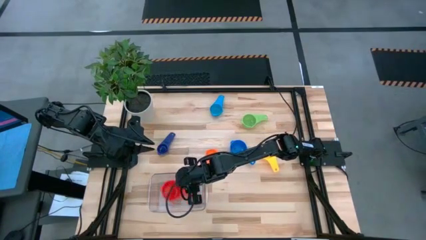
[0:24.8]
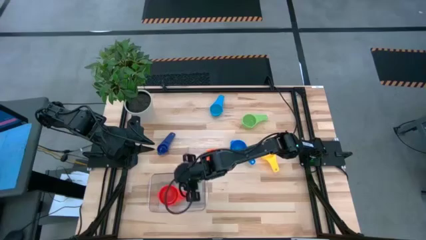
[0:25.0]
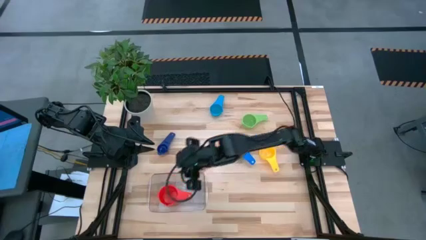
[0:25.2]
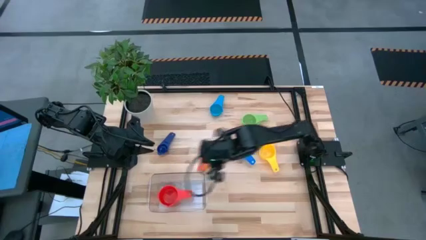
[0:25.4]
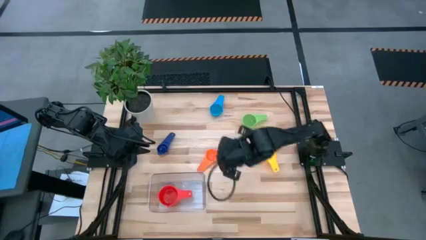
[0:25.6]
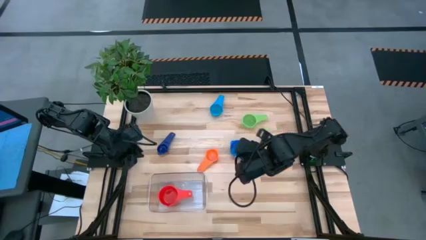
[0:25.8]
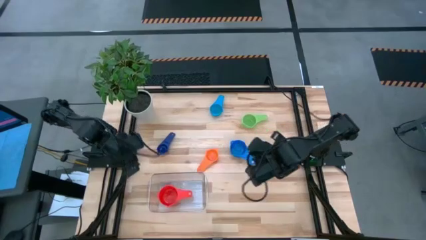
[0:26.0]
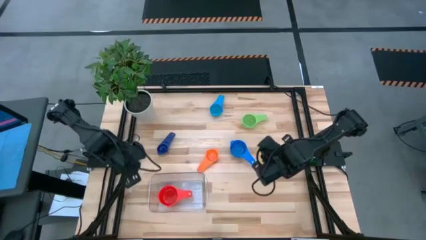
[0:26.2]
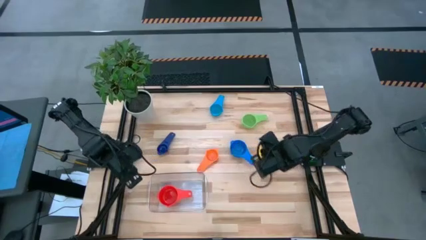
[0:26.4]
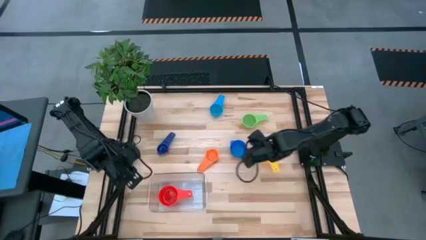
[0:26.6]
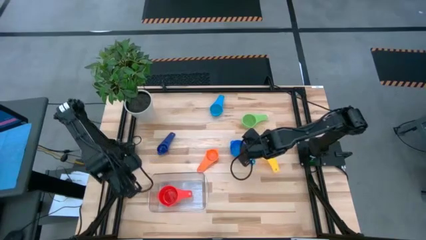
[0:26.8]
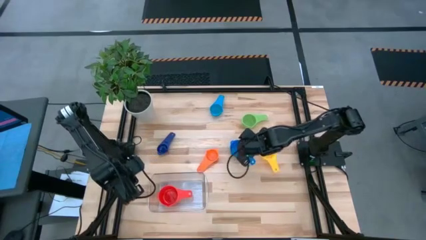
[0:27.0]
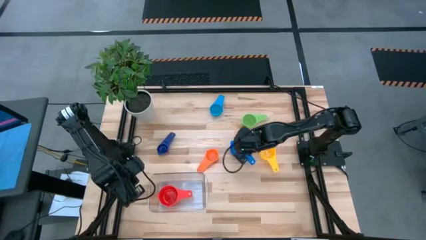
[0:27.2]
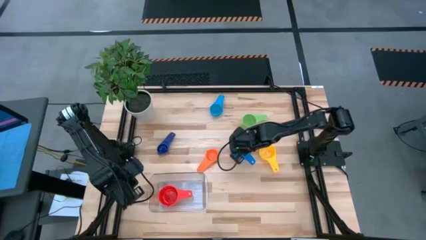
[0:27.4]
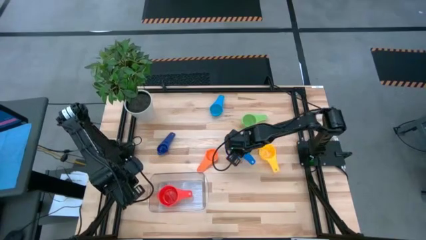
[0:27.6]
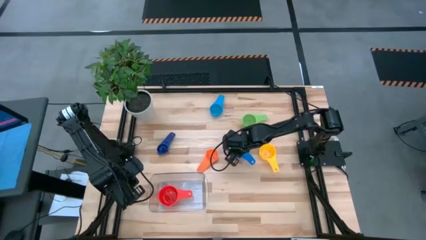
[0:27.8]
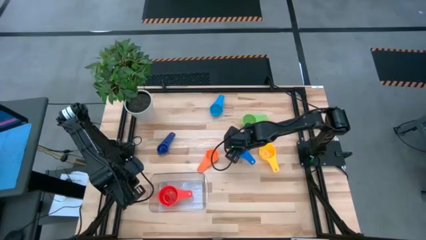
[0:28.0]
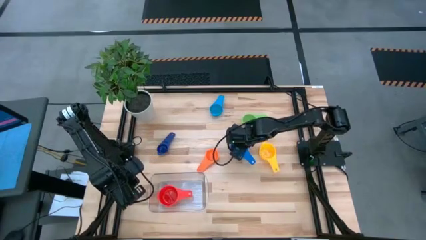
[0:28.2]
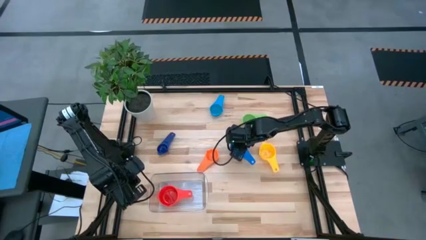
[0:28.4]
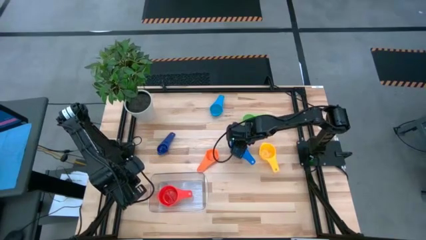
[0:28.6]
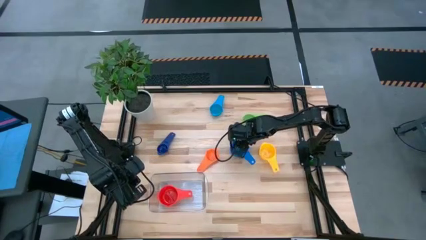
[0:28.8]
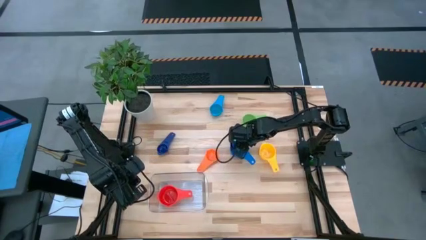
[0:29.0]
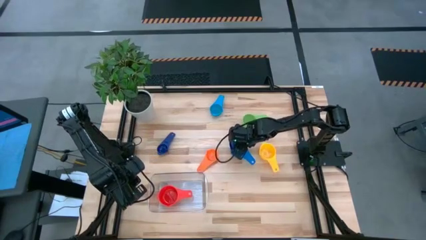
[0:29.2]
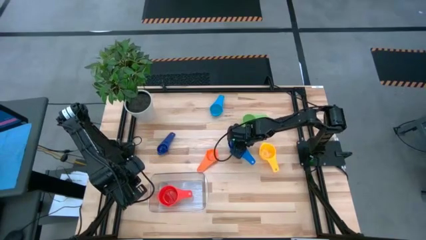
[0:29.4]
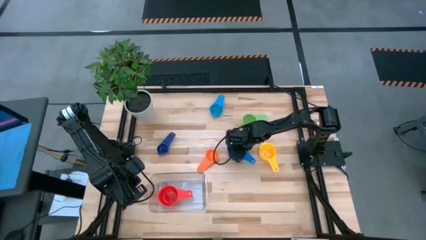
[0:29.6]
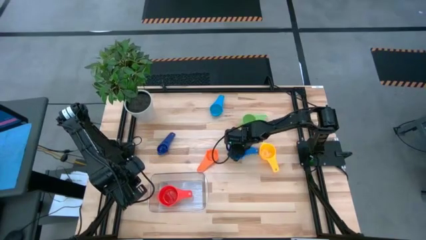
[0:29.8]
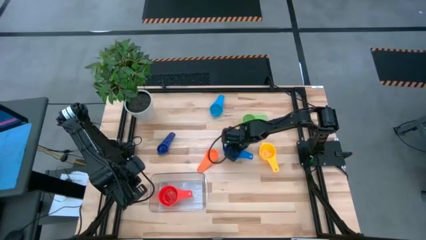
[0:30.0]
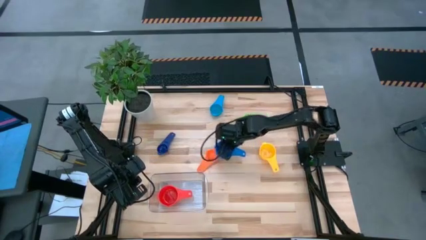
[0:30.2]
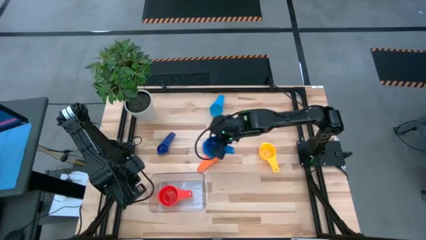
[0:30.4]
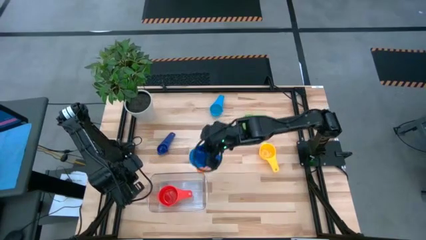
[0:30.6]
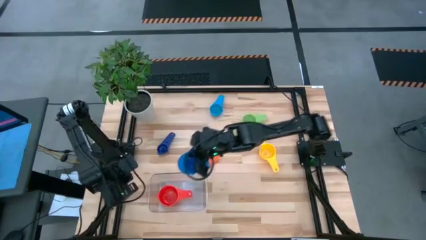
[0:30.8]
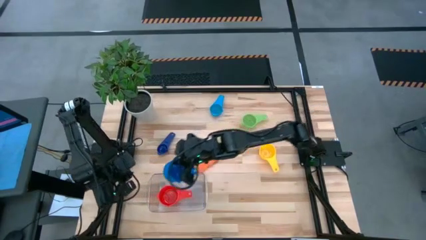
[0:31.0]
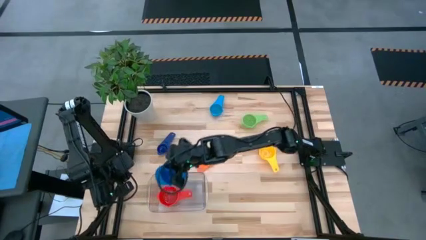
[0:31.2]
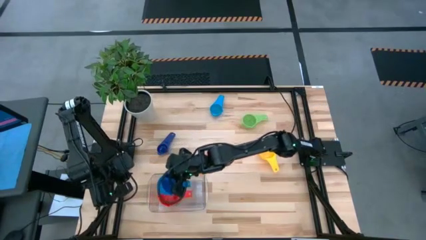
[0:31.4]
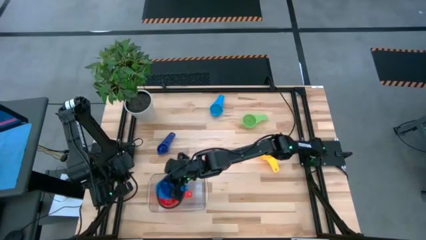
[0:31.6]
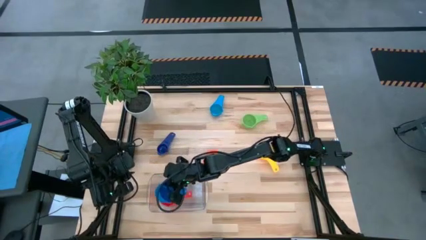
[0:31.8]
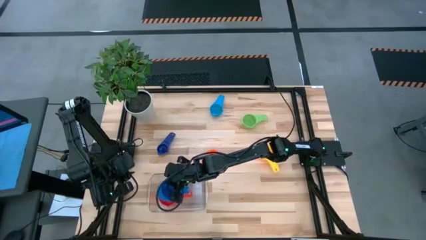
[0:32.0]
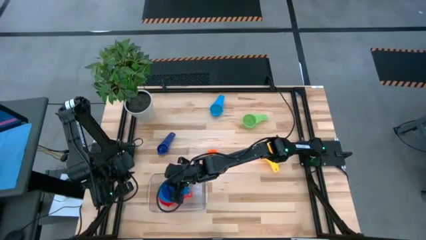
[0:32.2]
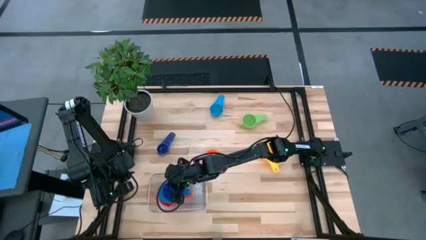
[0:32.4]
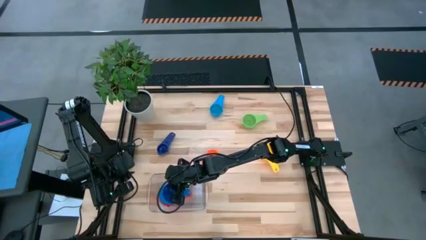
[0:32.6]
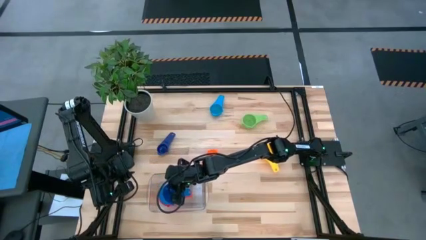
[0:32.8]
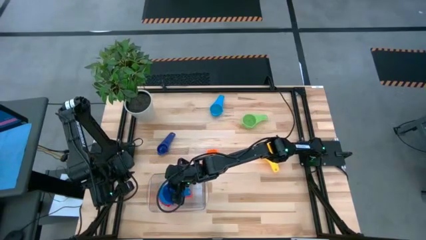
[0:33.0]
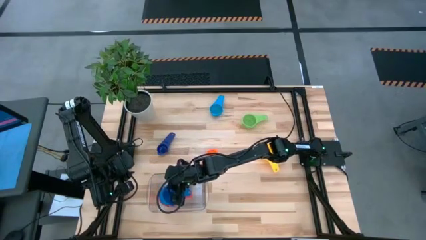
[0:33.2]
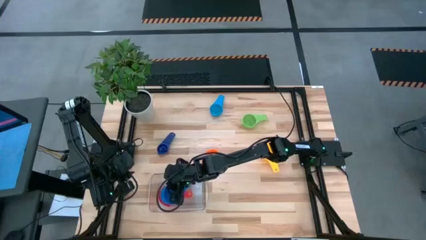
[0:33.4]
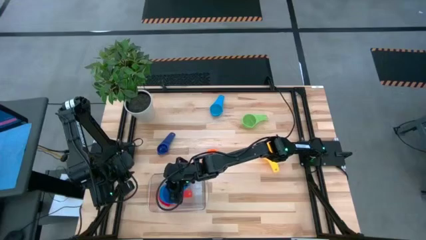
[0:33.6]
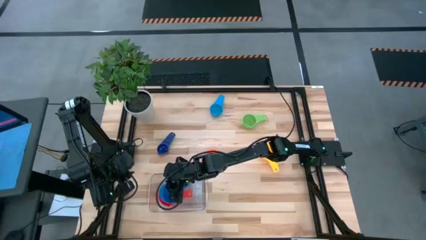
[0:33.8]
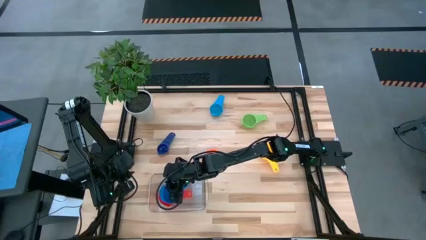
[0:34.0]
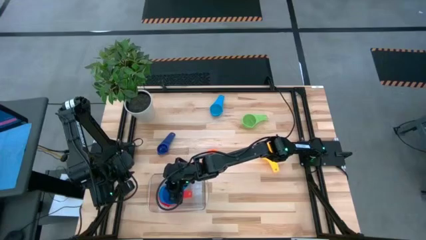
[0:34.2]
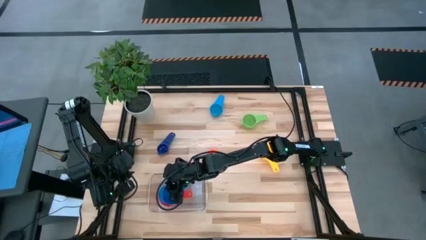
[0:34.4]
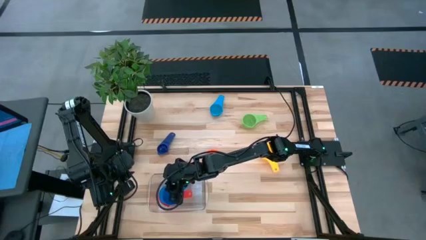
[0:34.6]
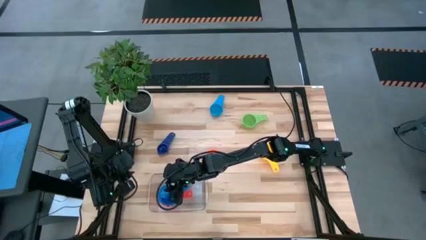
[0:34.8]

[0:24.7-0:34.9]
Task: Nest measuring cups in basket
Stack the blue measuring cup on top of the red measuring cup into the transparent bin

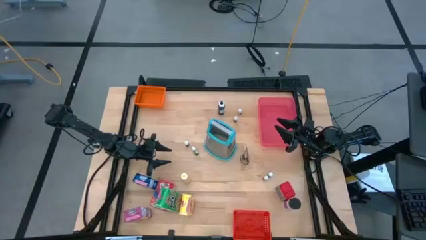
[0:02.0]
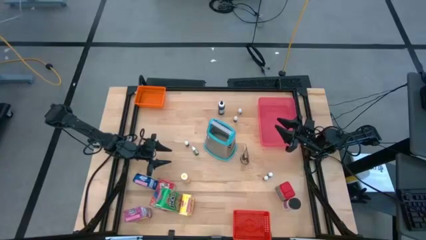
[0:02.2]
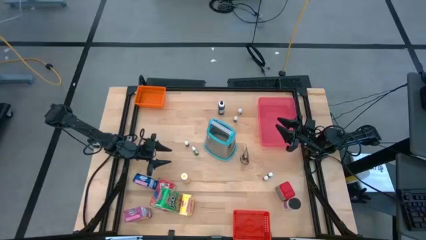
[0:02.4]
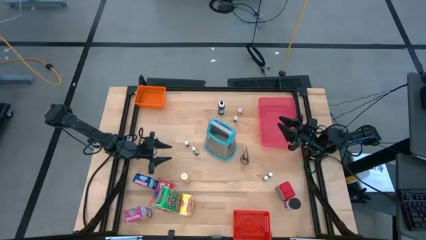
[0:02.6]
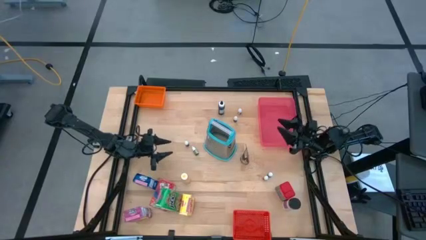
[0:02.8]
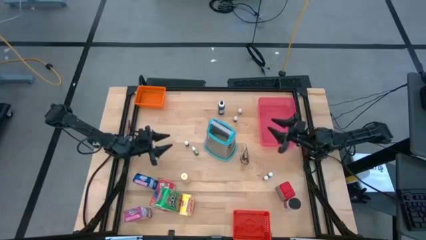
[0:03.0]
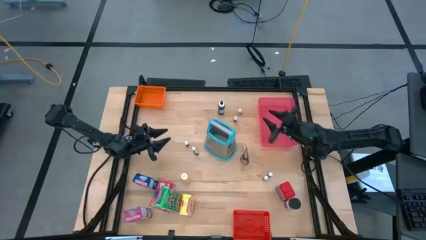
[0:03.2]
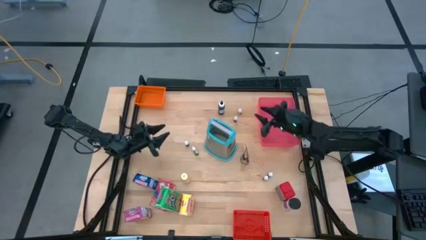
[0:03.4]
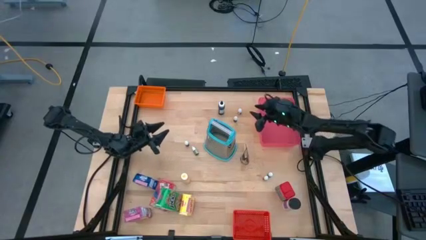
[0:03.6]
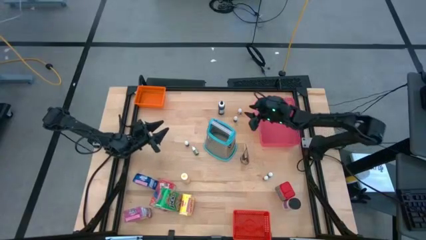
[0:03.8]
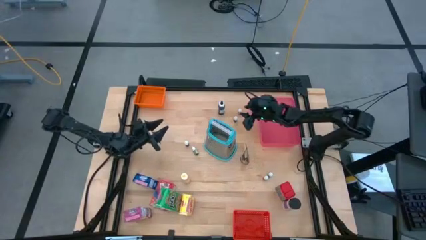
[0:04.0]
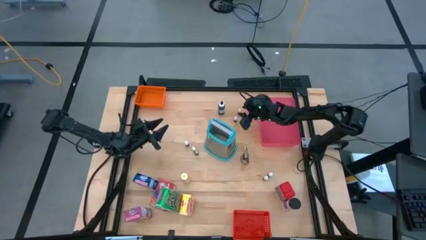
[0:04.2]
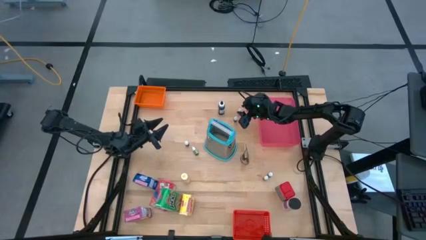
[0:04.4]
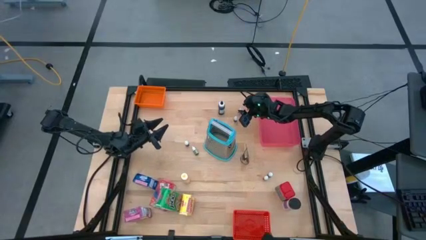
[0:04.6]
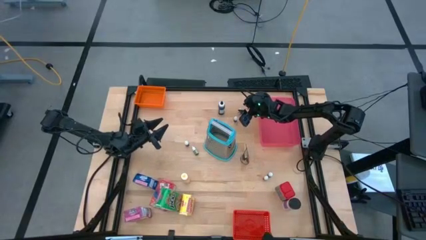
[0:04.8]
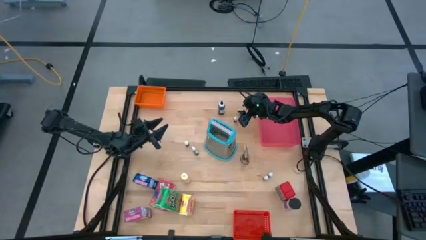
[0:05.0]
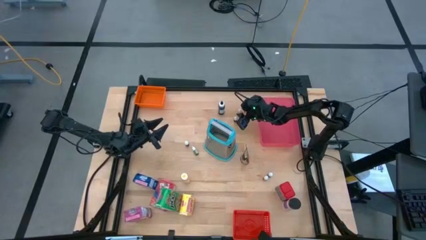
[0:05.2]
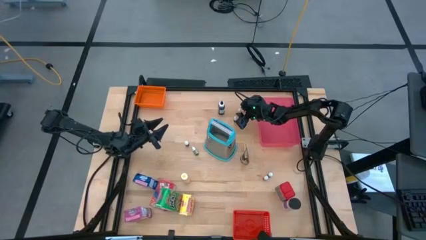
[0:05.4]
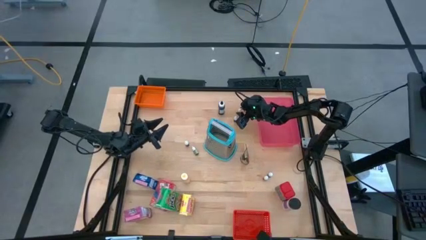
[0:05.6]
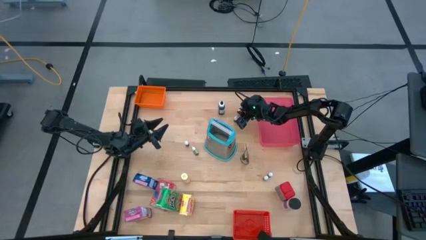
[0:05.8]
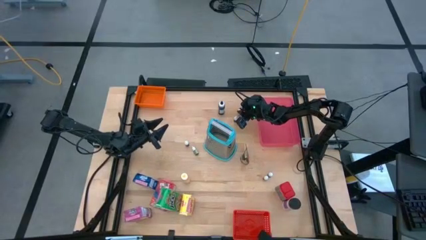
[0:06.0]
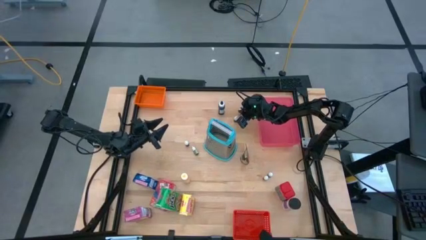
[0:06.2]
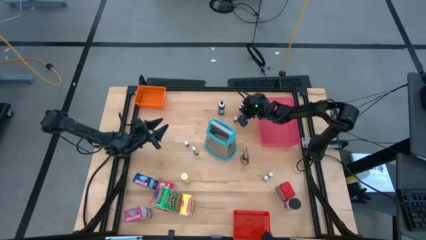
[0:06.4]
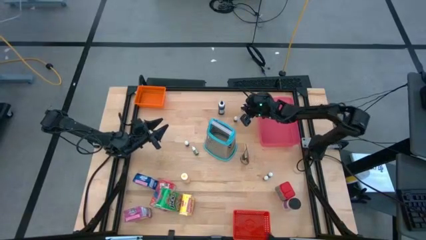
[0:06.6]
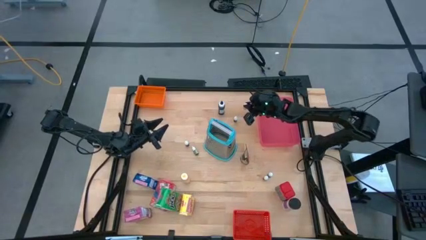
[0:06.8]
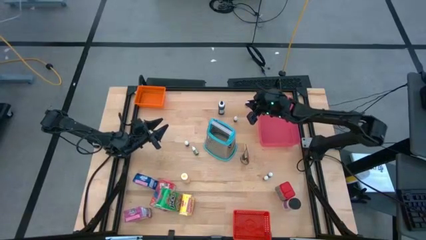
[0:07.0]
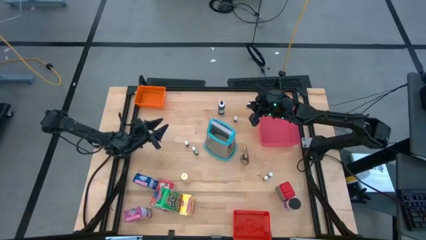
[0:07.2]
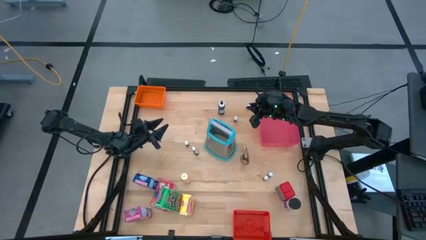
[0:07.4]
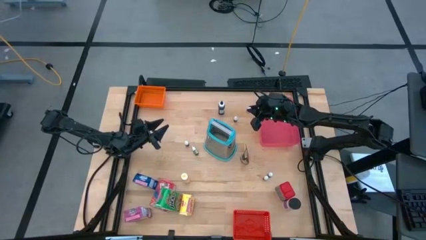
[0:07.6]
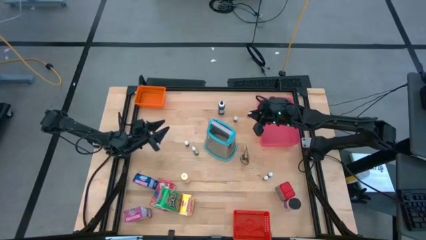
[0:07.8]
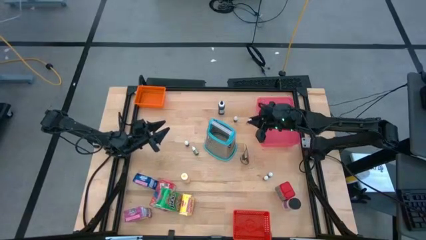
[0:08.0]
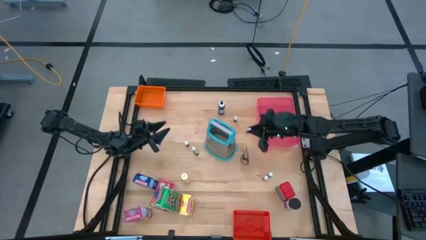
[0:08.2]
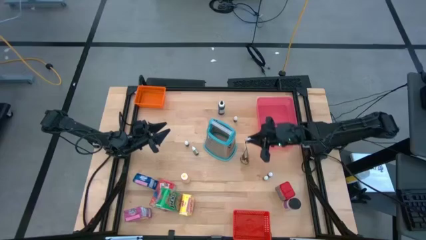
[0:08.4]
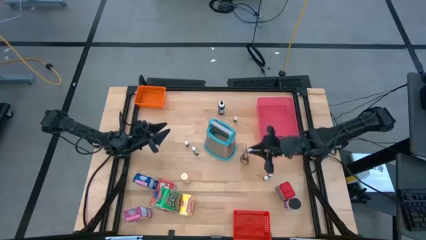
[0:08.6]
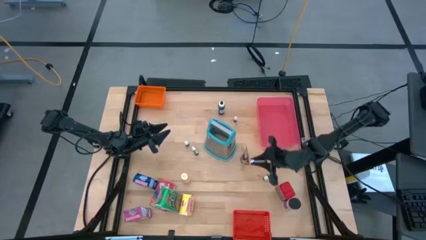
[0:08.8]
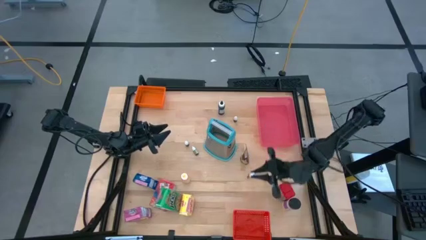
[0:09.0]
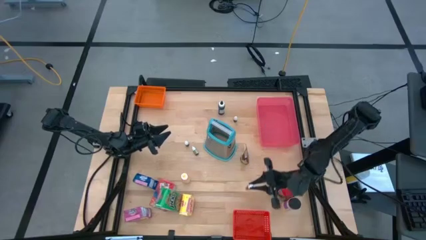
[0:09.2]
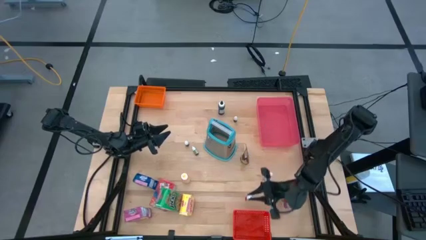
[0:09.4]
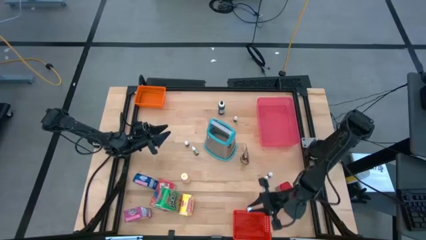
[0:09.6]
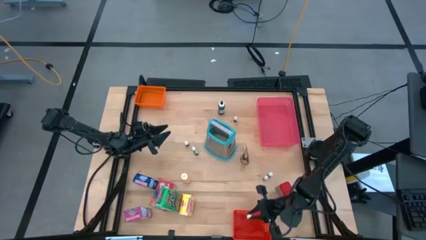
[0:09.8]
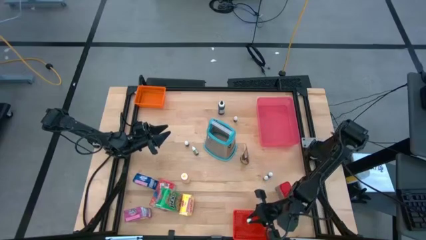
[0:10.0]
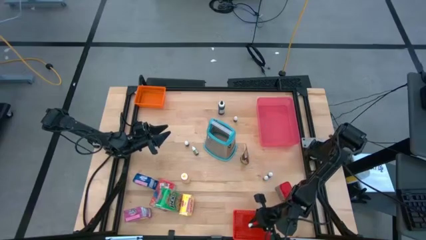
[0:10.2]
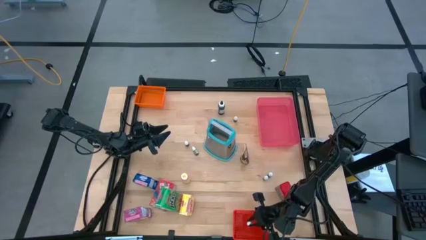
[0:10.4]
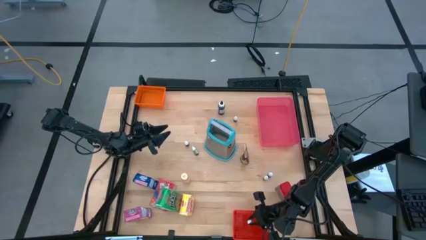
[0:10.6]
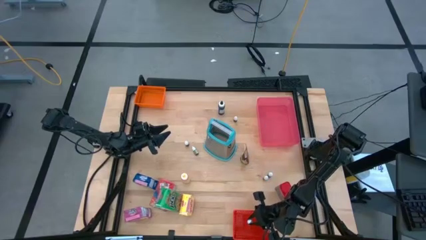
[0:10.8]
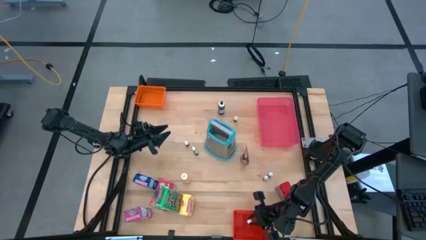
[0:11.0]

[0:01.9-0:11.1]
Task: Pick & Place Kitchen Items
Put the small red food coloring bottle into the red bin
